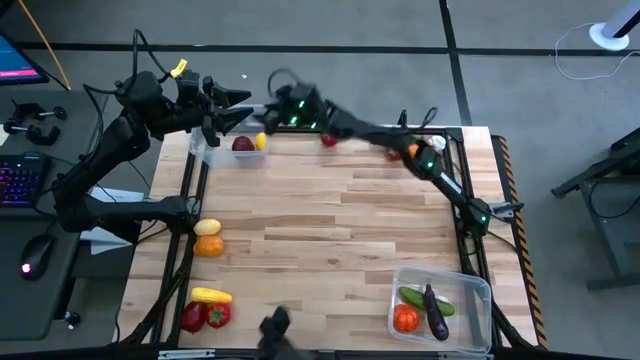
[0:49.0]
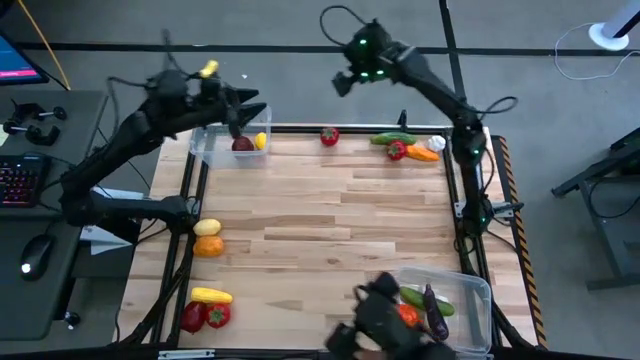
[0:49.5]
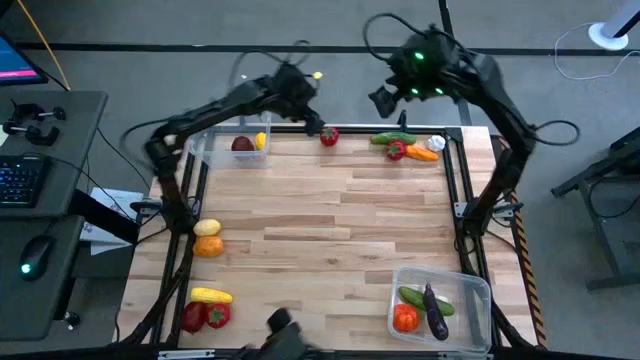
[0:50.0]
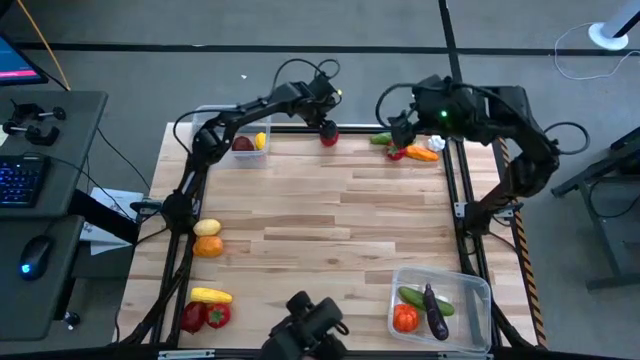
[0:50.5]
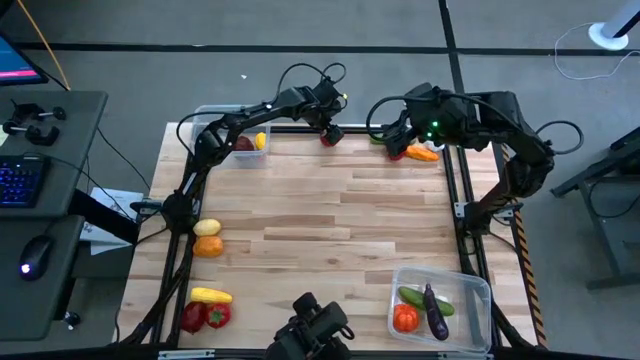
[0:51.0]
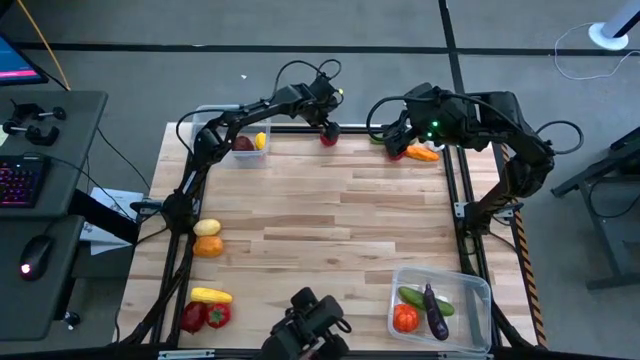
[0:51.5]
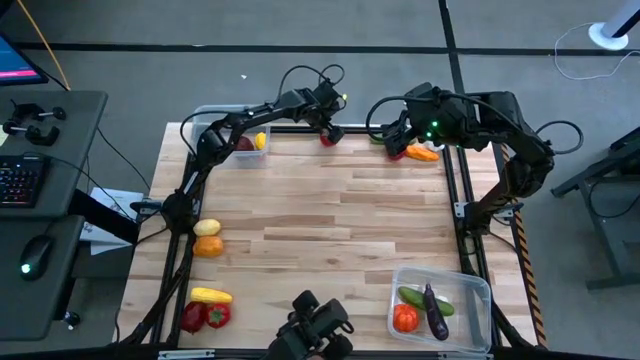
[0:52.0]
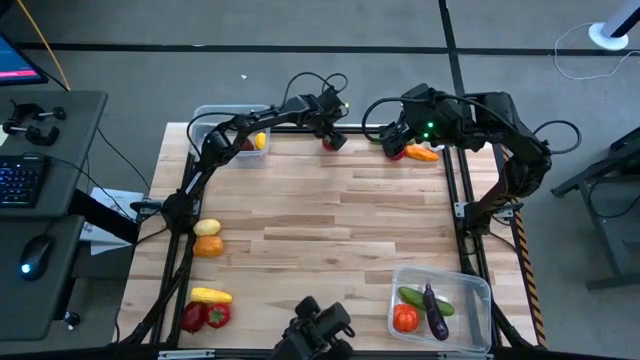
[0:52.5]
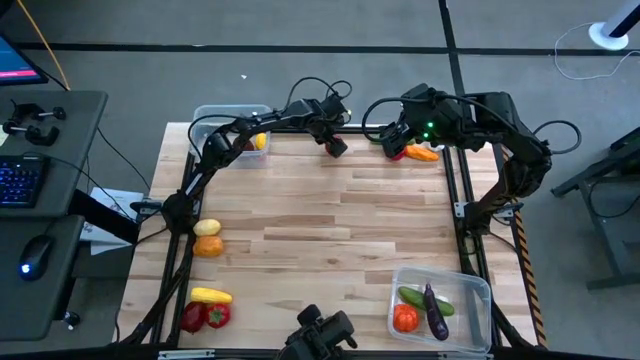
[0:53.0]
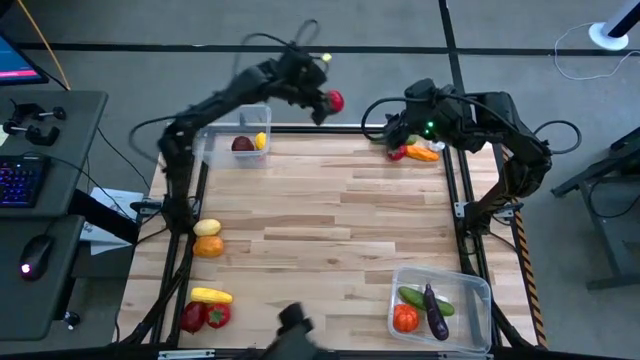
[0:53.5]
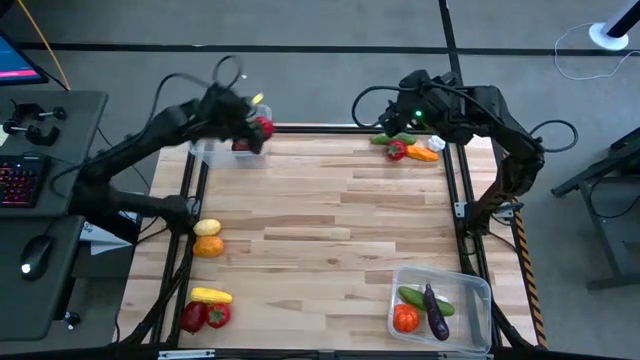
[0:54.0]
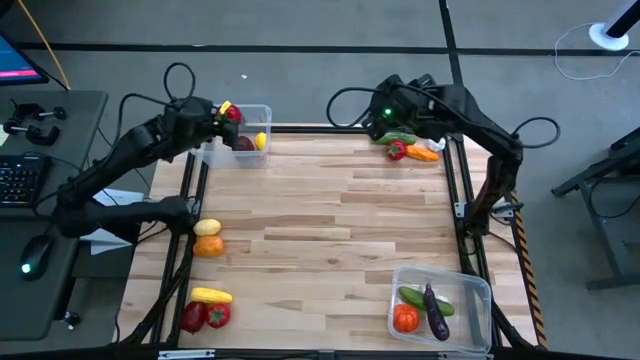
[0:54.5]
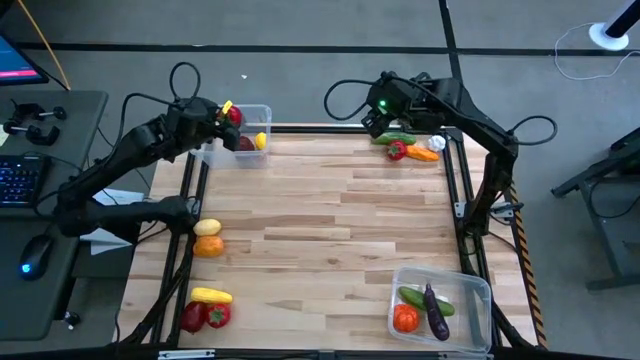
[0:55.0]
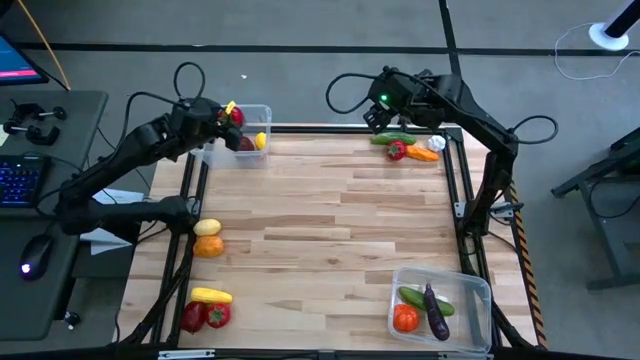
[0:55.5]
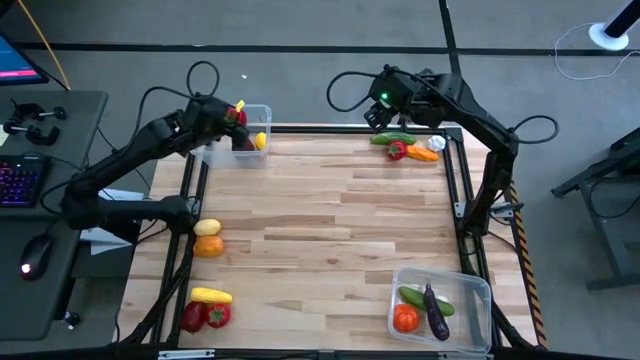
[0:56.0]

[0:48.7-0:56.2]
Task: Sort produce into baskets
Put the top left red tomato into the top transparent bin

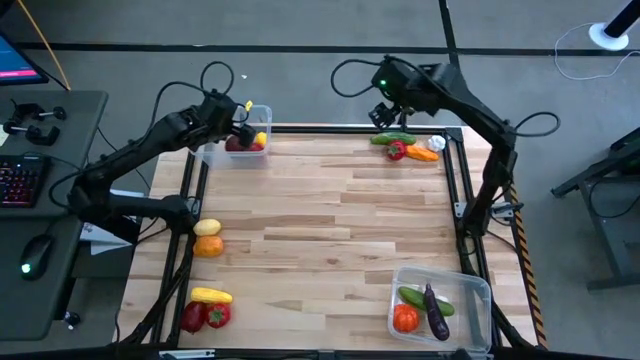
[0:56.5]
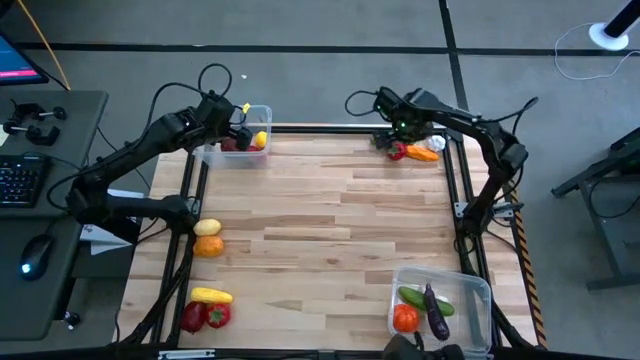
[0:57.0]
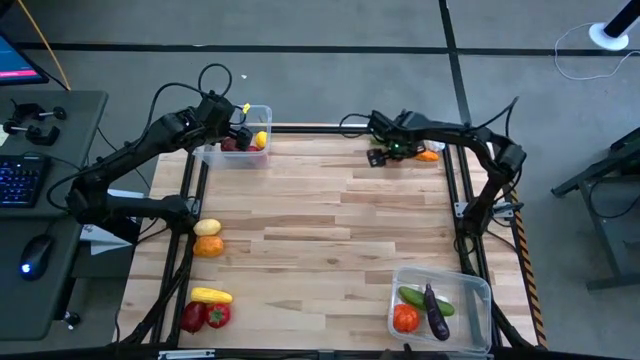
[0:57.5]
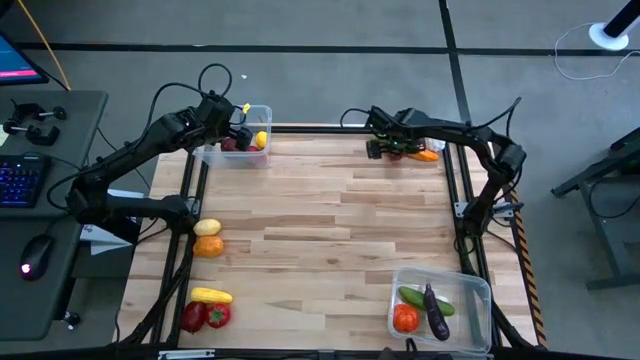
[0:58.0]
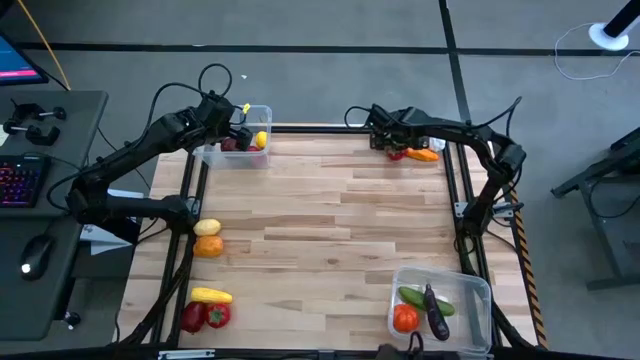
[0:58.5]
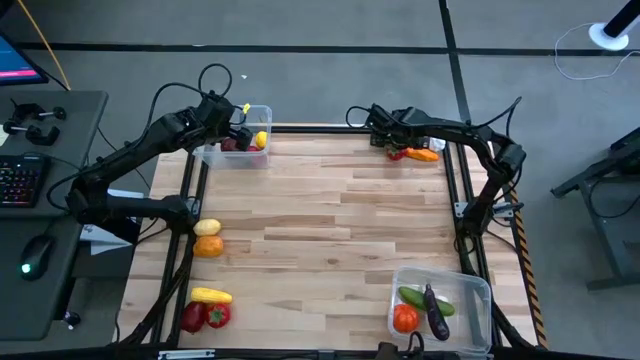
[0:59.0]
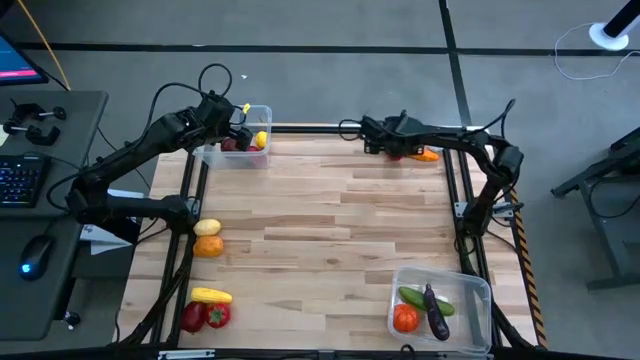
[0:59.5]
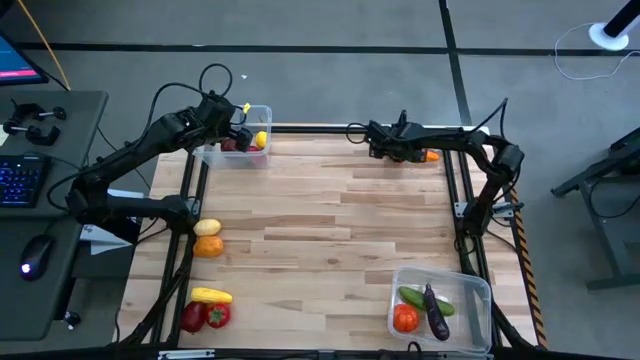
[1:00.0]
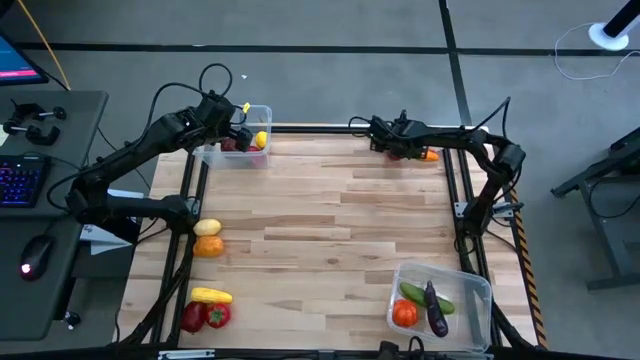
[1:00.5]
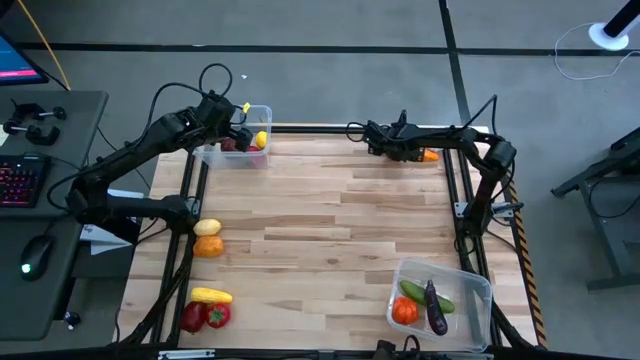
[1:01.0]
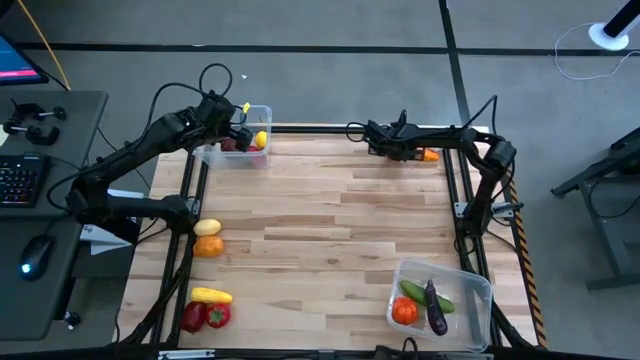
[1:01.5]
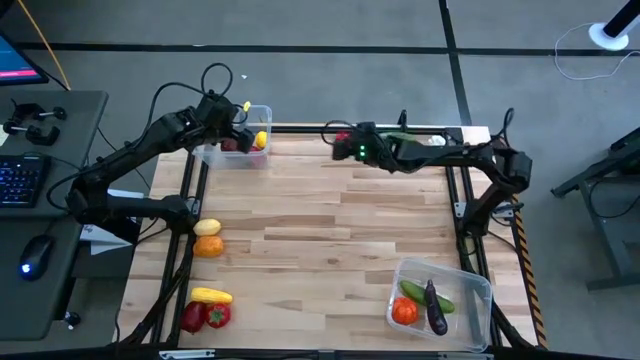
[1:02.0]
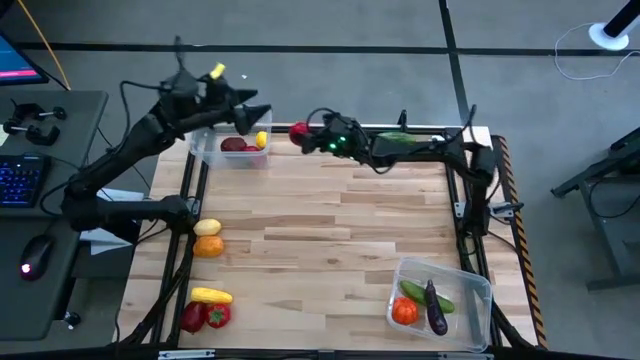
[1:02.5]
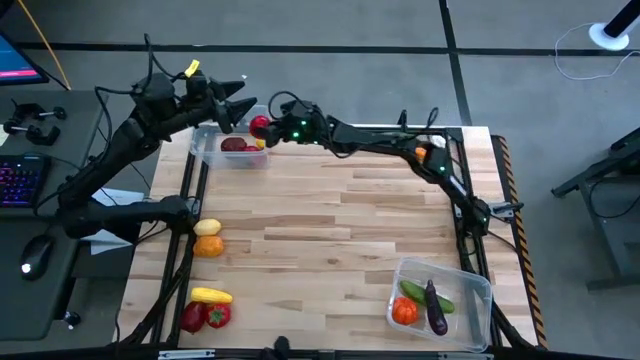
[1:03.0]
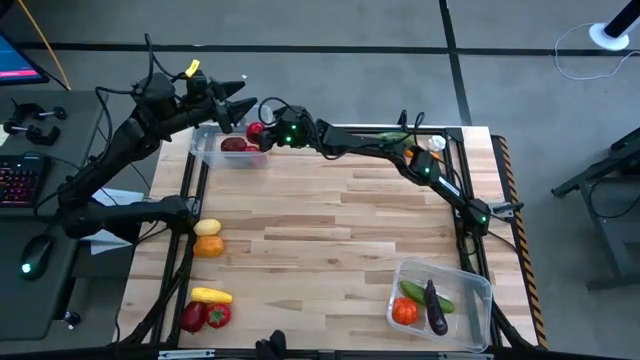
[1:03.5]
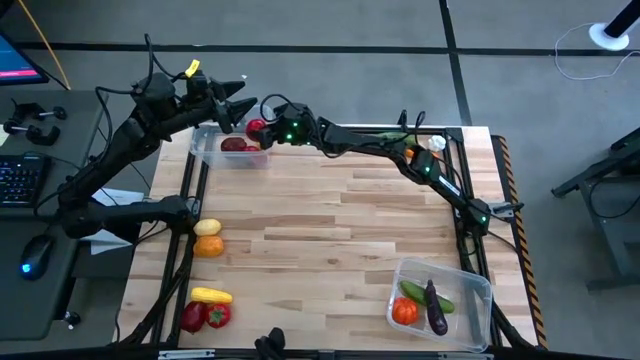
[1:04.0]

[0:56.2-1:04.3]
Put the top red tomato into the top transparent bin

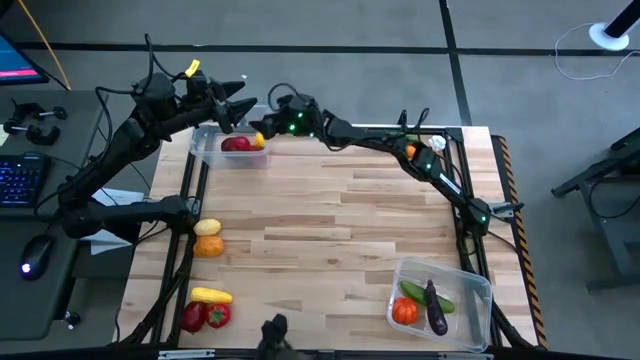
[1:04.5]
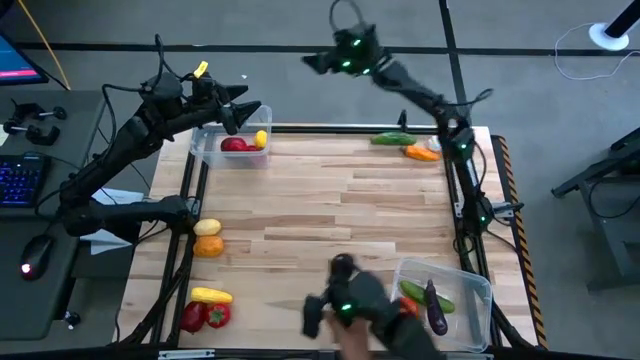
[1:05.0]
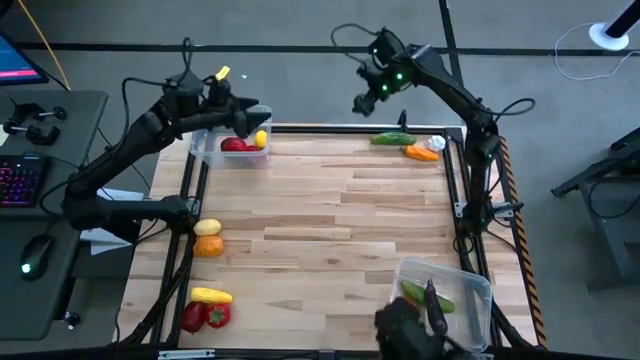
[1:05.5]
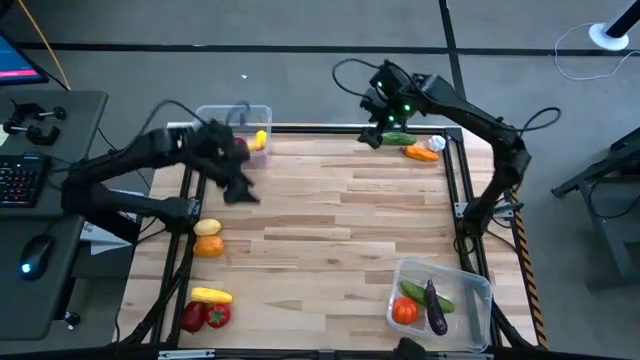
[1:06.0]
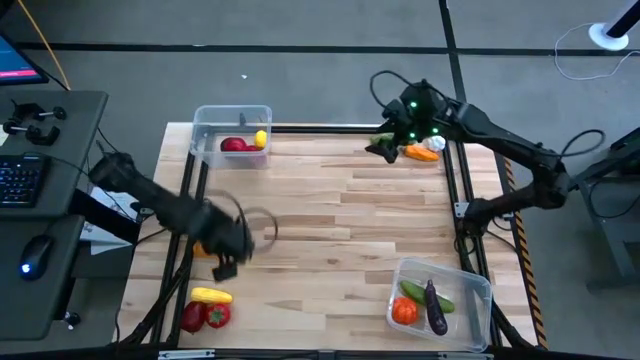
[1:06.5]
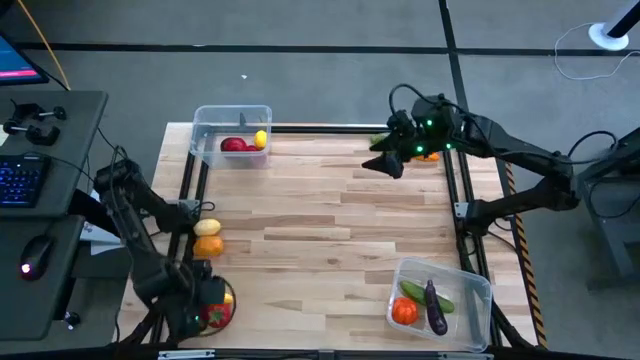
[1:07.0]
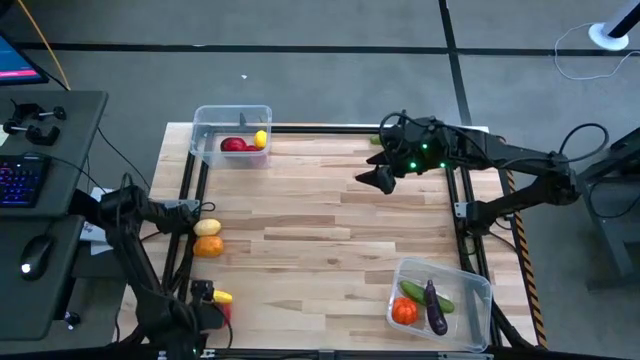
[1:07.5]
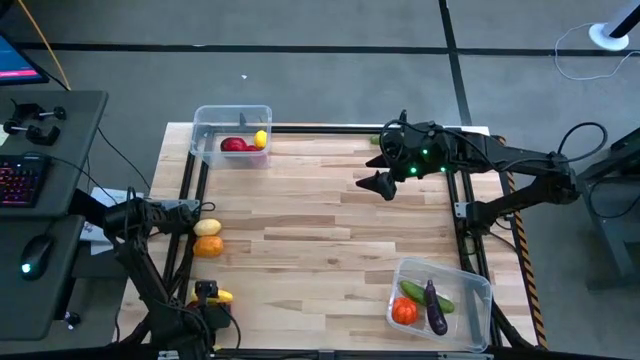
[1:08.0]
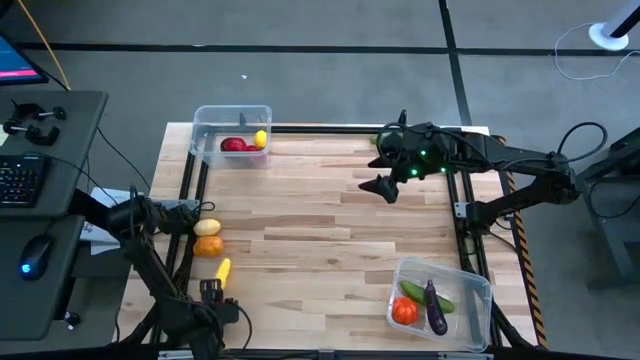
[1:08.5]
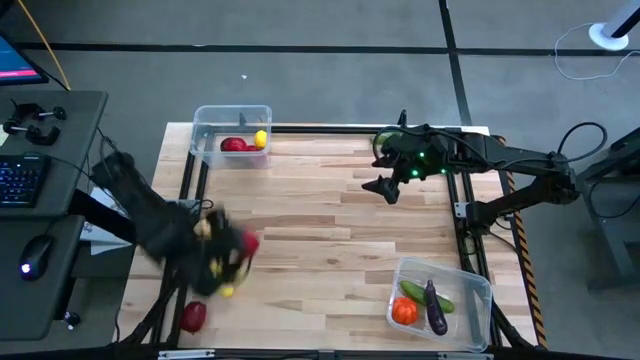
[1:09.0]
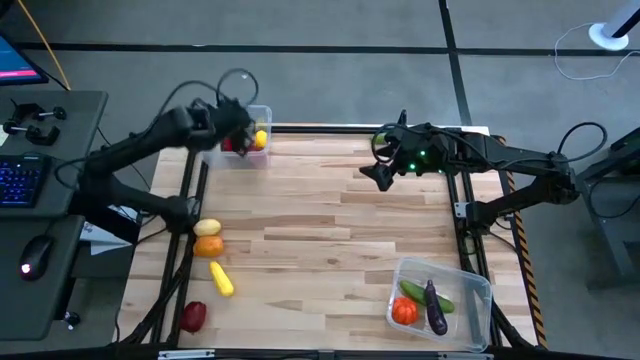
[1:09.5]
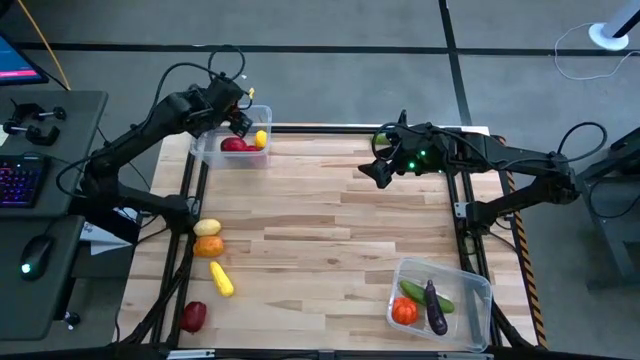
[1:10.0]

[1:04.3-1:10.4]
Put the red tomato into the top transparent bin
